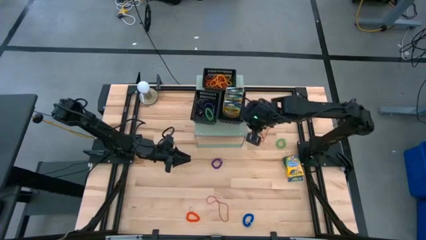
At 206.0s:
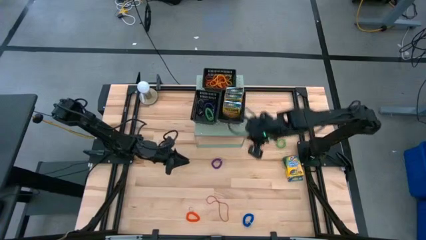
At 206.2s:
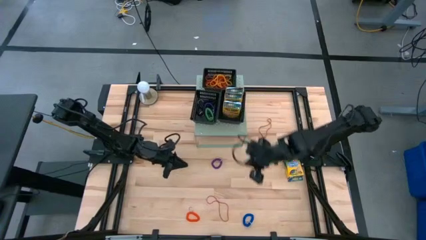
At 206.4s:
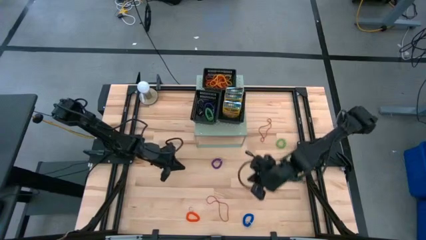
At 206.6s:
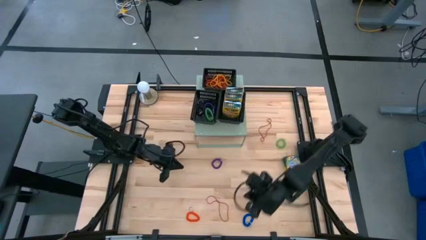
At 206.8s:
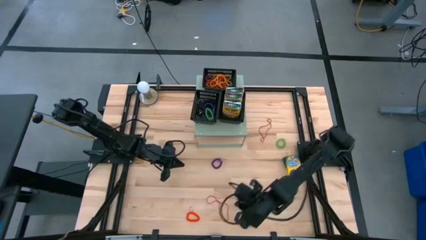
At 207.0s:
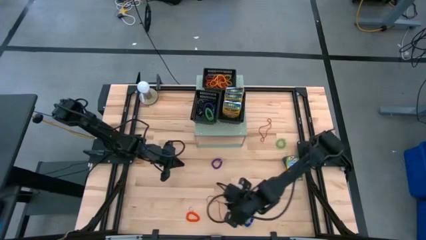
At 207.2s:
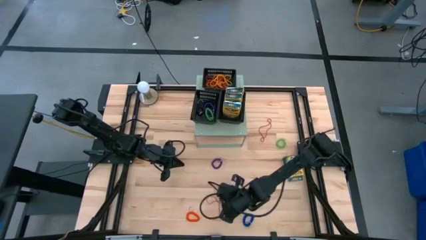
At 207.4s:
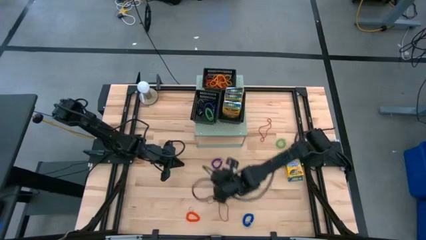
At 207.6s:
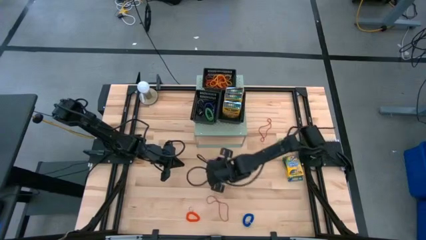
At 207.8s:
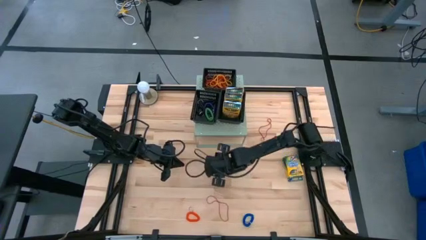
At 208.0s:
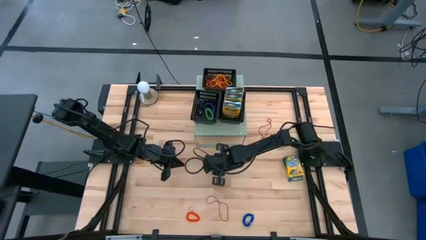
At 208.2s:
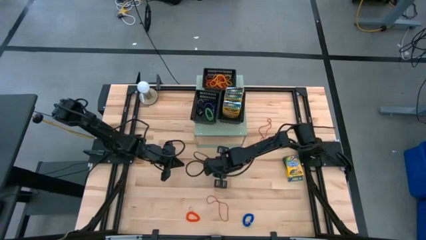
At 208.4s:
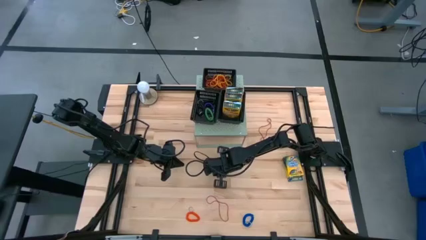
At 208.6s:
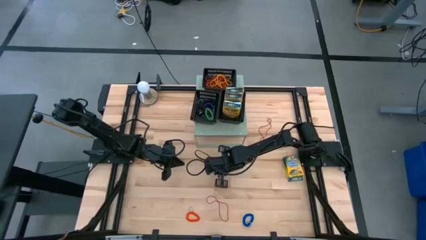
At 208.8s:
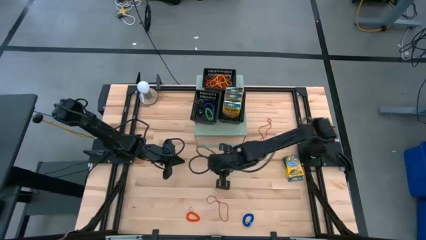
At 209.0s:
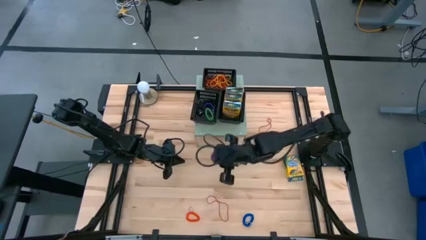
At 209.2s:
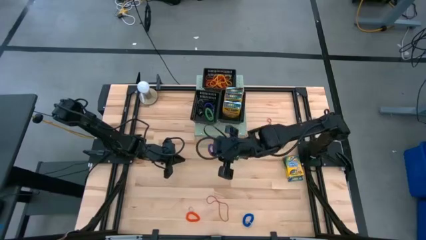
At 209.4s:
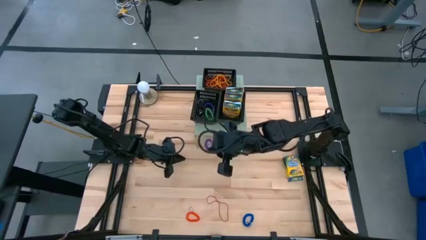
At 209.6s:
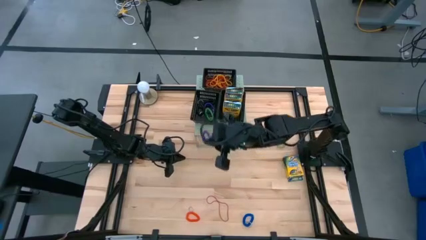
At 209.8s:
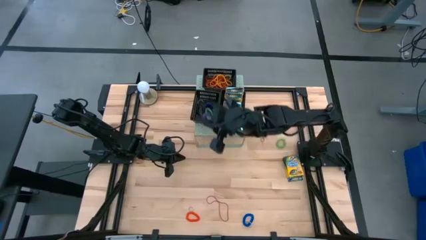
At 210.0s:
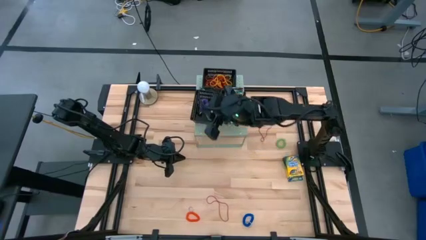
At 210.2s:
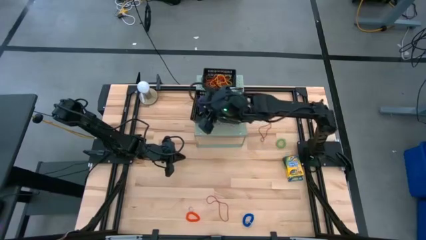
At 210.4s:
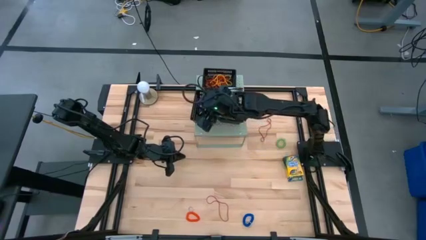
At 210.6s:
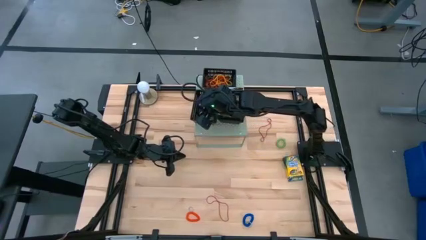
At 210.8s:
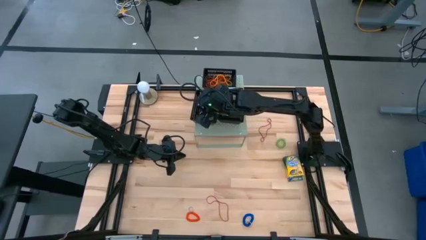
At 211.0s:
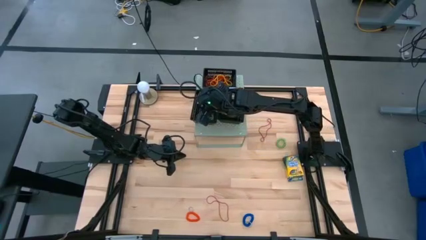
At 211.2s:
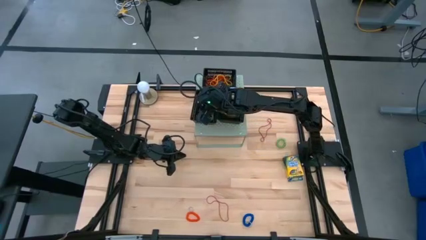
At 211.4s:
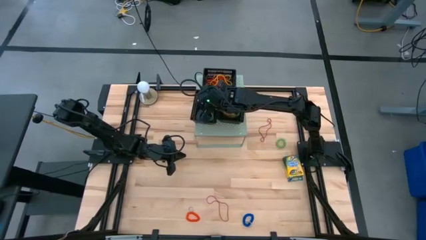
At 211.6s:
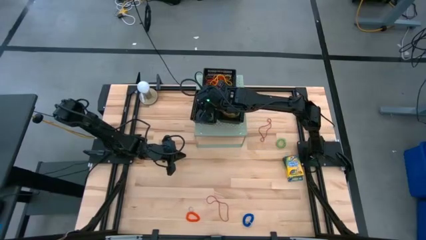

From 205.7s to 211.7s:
Task: Pick & Place Office Desk Supplies
Put the violet spiral keychain into the bottom left black bin

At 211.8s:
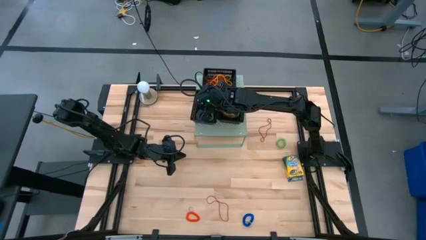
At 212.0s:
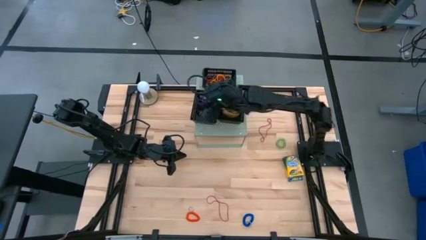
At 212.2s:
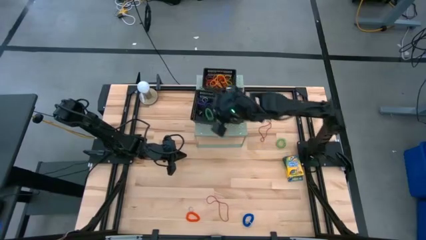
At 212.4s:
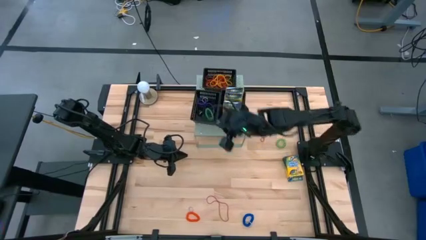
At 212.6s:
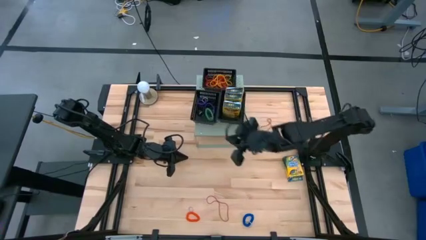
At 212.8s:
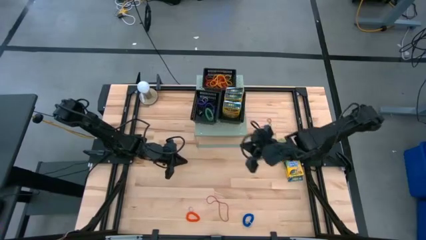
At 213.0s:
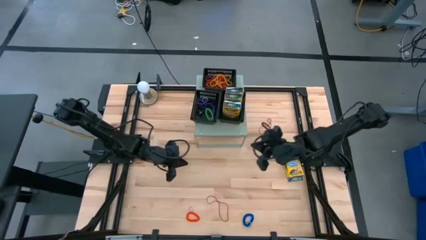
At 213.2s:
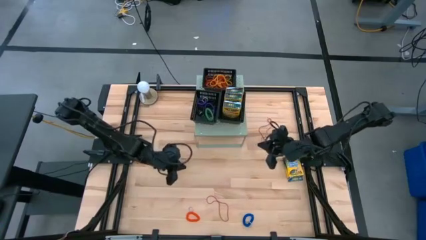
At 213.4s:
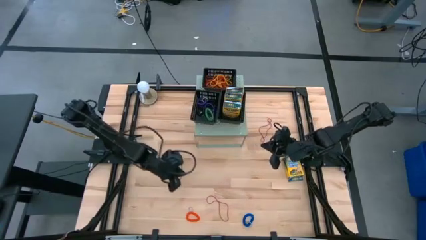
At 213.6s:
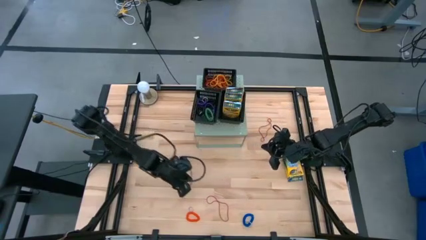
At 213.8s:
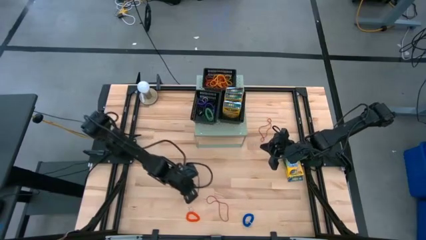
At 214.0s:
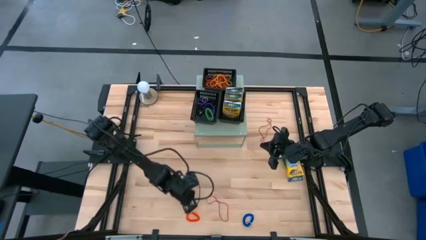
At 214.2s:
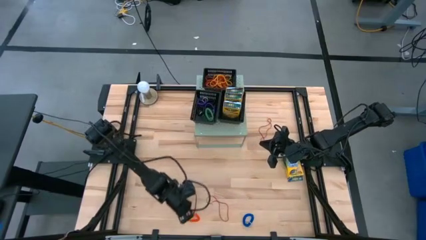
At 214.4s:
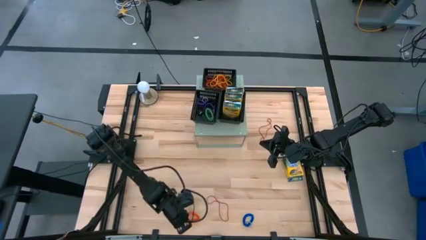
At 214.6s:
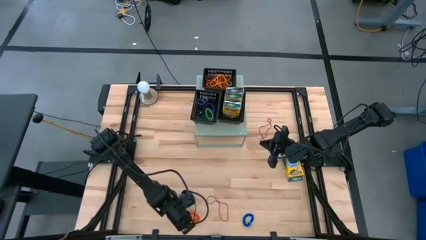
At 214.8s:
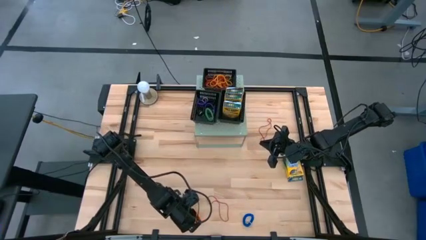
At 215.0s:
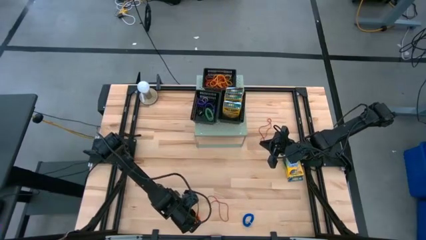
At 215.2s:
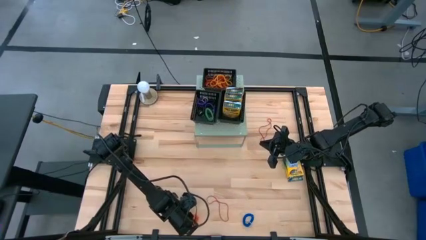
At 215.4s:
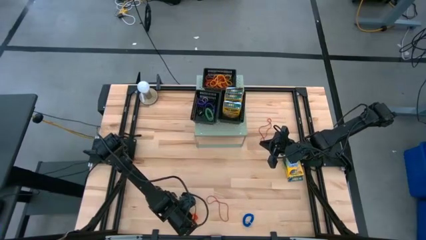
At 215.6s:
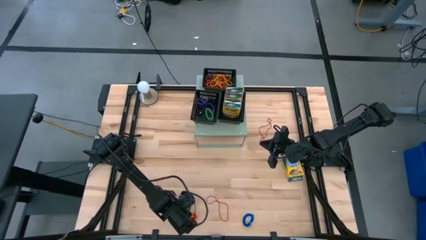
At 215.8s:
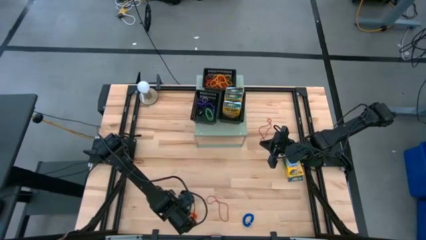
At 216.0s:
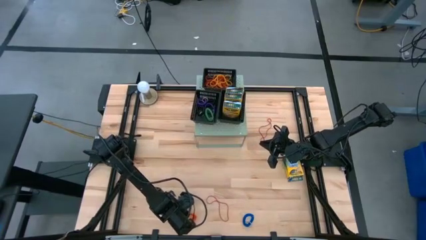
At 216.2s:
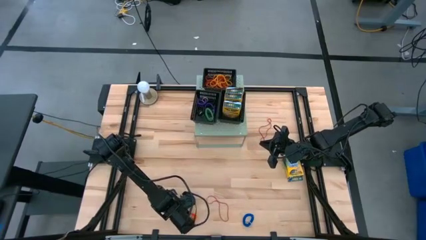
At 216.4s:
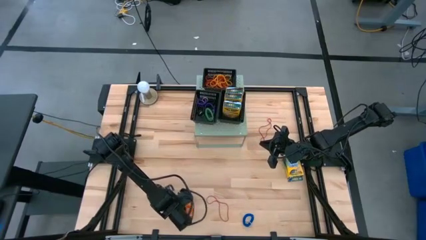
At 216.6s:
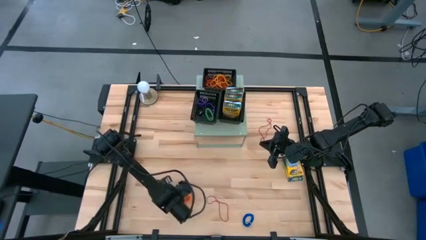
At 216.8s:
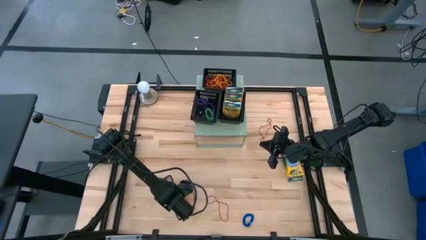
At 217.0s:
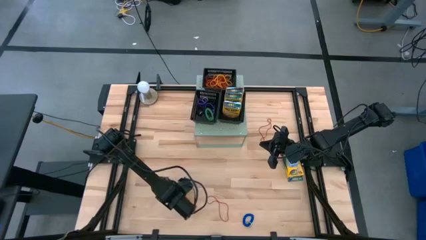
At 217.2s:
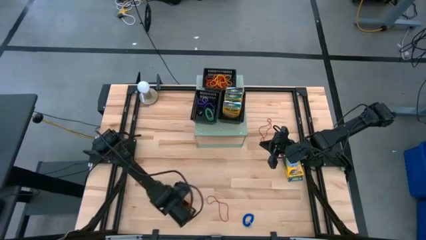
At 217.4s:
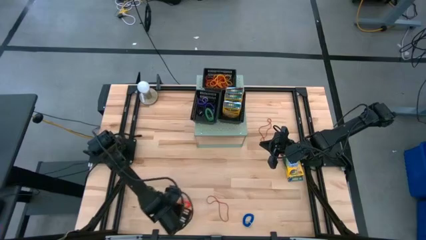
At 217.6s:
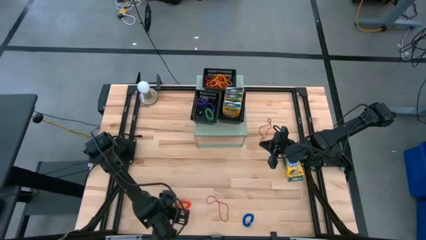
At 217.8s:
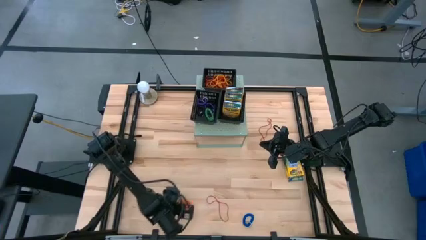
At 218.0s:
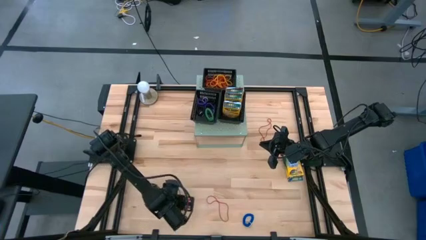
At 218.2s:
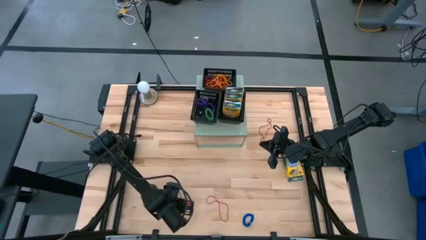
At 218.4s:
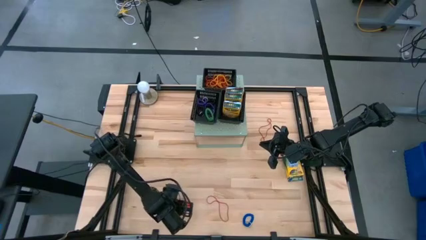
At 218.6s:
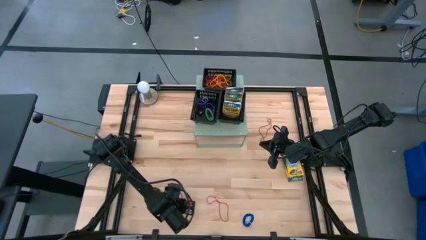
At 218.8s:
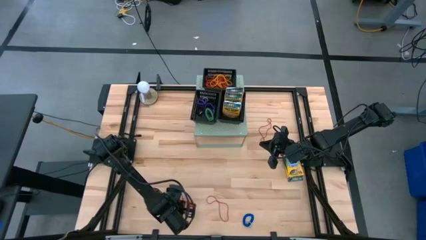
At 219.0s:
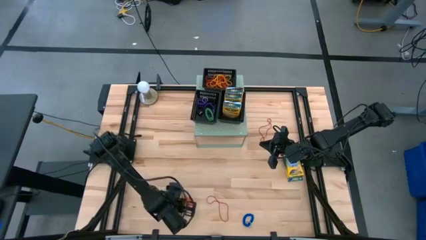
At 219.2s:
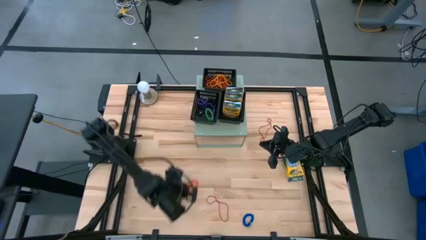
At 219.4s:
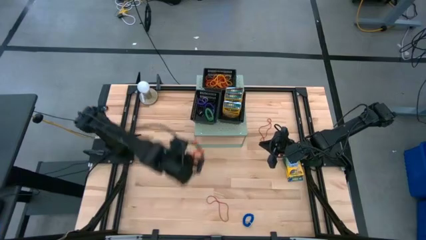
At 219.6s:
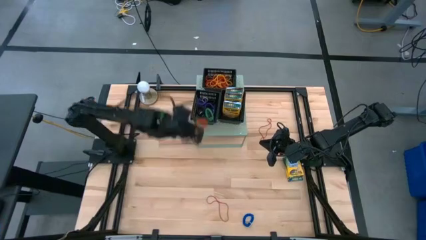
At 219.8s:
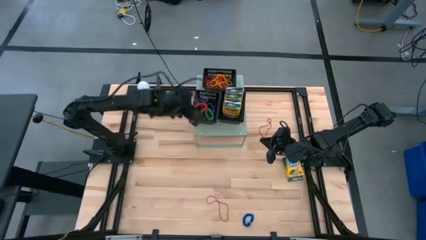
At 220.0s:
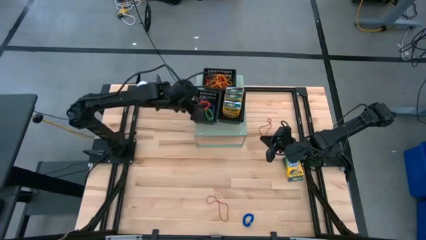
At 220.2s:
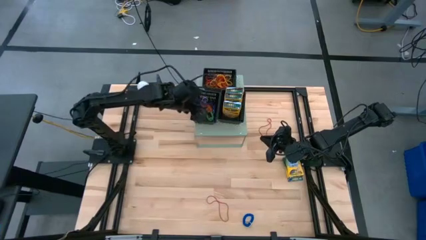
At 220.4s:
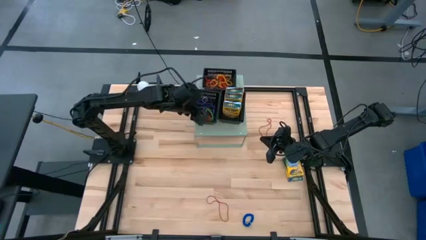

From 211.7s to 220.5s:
Put the orange spiral keychain into the bottom left black bin

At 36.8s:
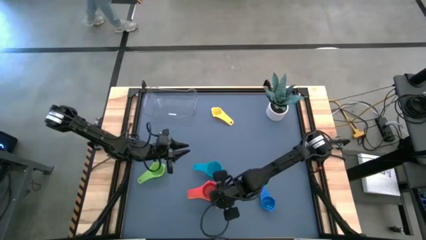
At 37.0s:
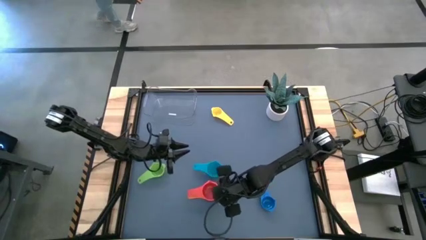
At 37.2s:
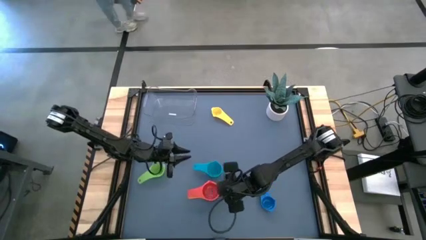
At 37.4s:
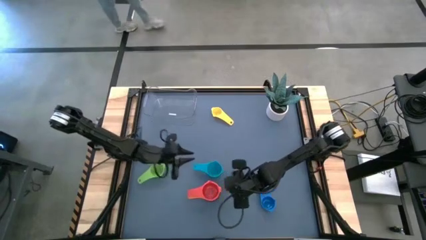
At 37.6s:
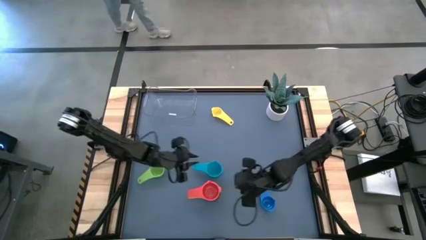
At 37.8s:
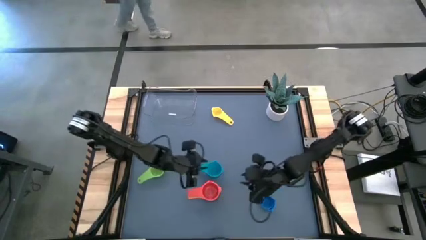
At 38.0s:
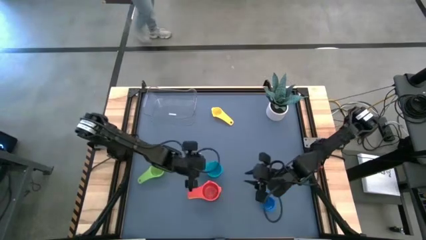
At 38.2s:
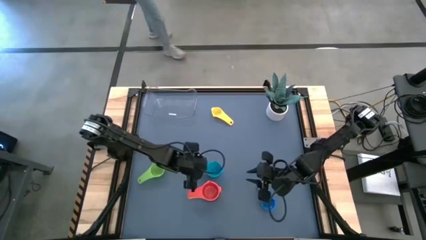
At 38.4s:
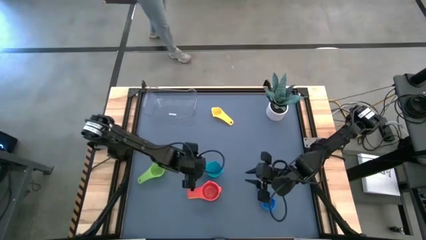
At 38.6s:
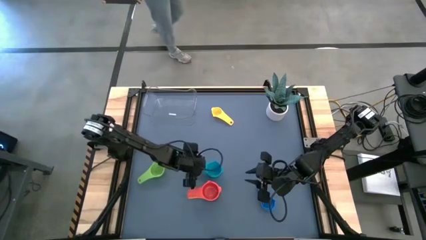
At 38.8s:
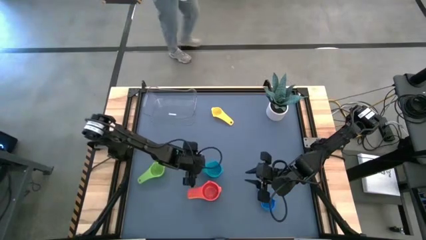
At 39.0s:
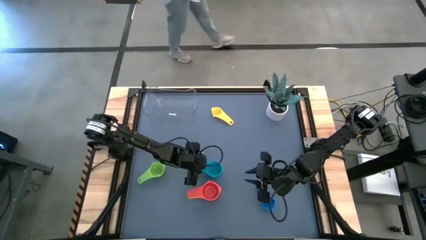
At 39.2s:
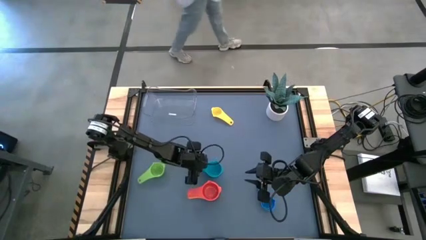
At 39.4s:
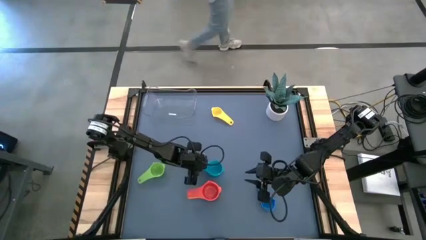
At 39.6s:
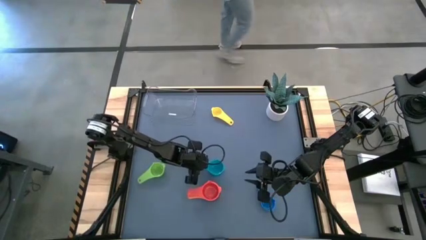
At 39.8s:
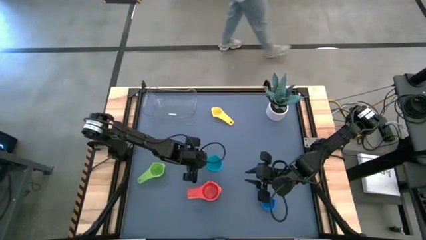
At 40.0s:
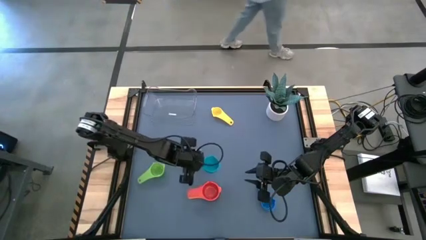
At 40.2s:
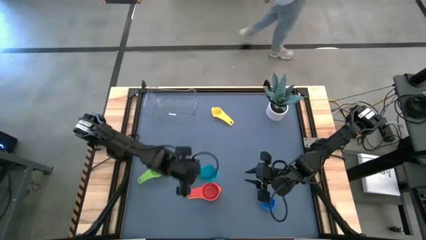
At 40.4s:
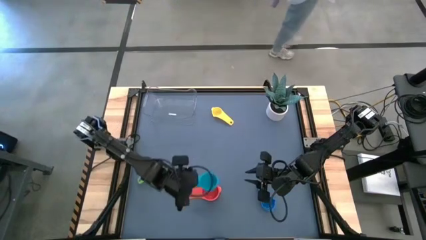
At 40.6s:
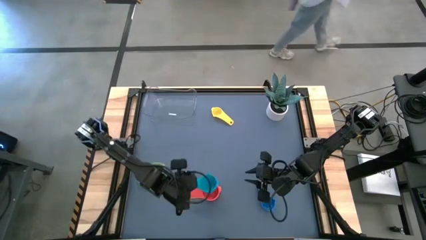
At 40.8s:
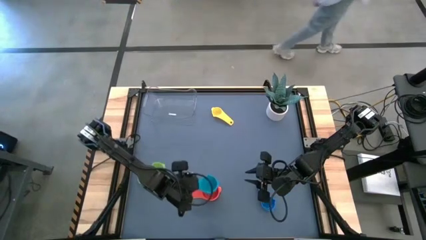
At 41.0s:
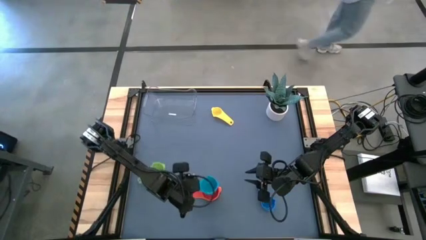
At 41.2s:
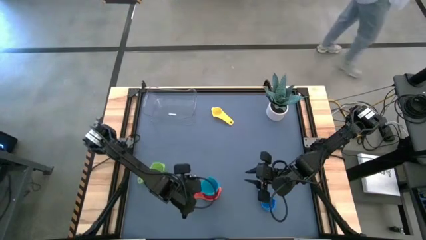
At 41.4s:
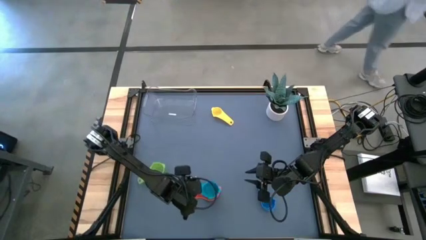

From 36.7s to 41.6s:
Task: Nest measuring cups in basket
Stack the light blue measuring cup on top of the red measuring cup
